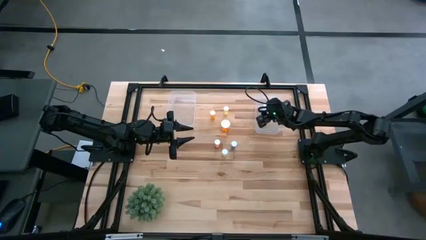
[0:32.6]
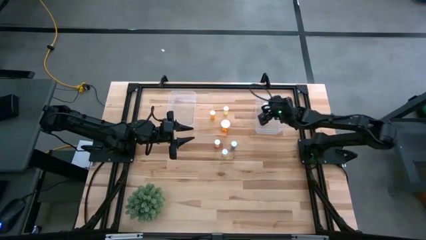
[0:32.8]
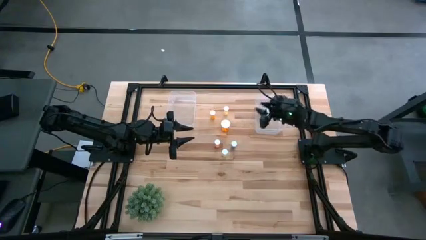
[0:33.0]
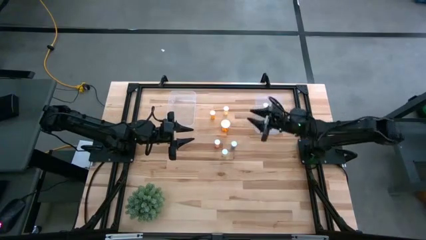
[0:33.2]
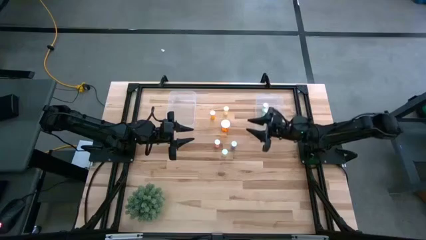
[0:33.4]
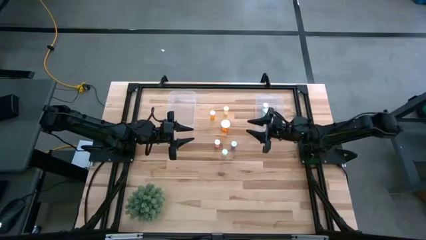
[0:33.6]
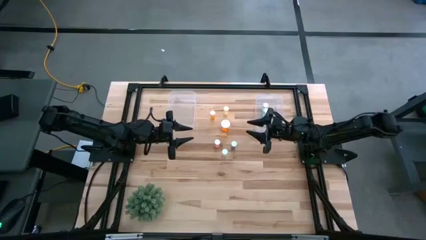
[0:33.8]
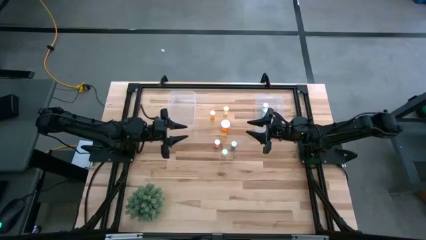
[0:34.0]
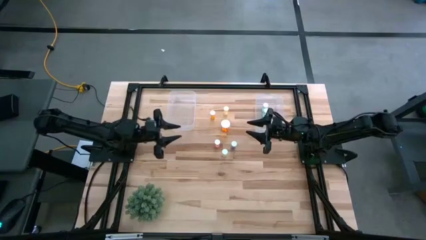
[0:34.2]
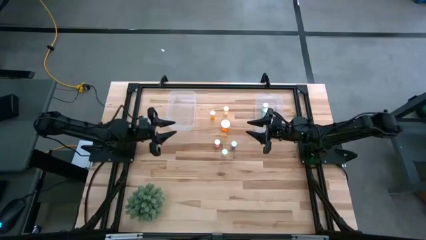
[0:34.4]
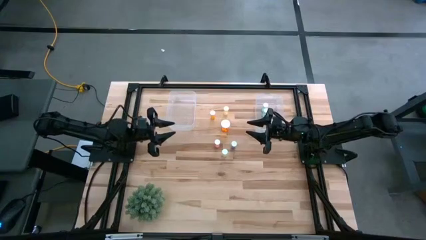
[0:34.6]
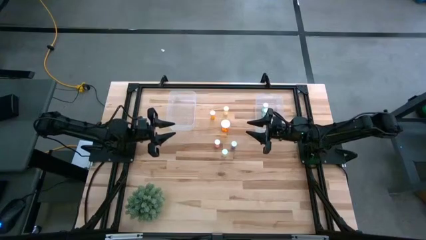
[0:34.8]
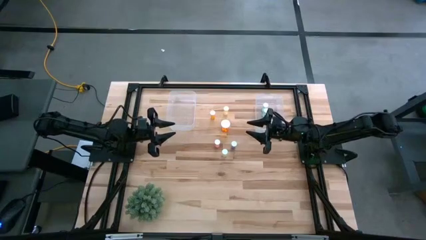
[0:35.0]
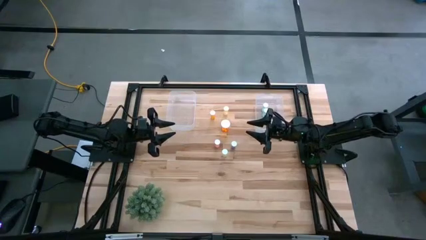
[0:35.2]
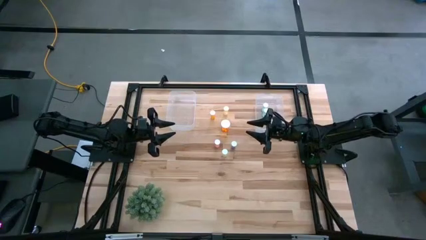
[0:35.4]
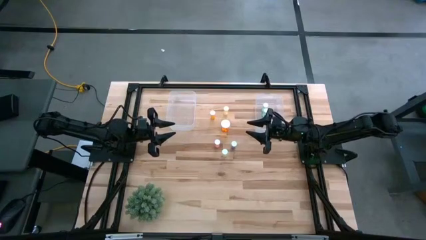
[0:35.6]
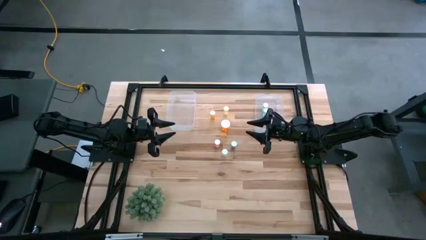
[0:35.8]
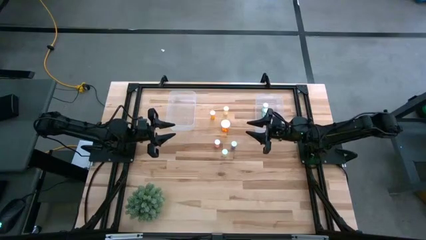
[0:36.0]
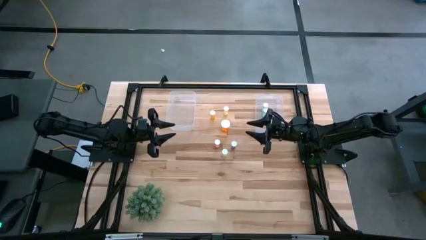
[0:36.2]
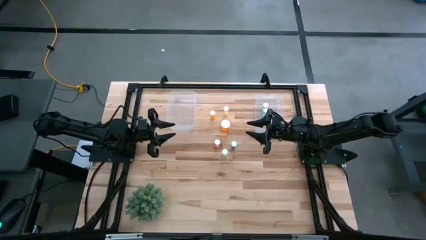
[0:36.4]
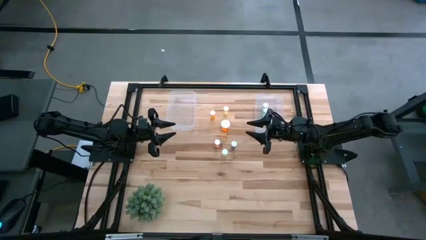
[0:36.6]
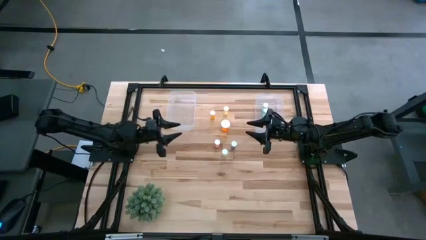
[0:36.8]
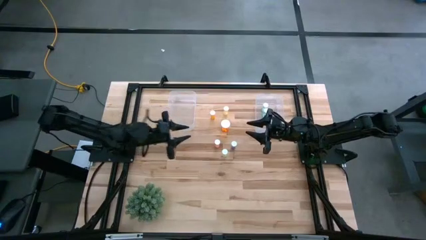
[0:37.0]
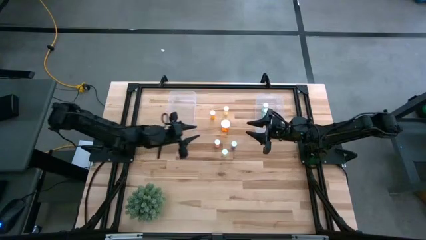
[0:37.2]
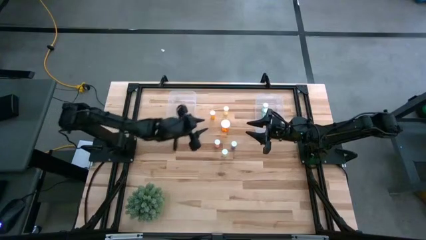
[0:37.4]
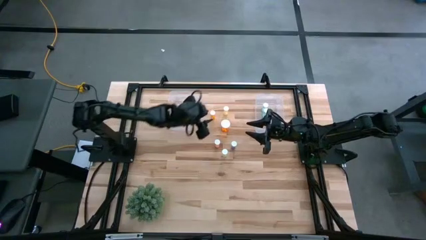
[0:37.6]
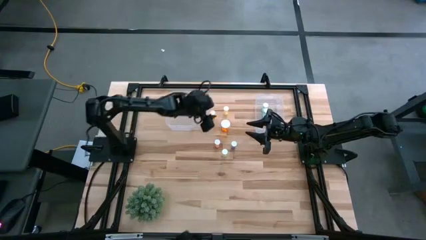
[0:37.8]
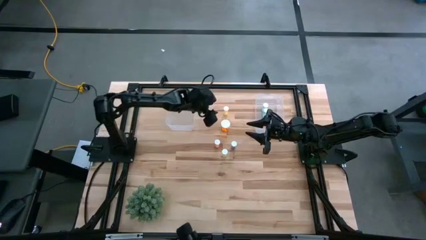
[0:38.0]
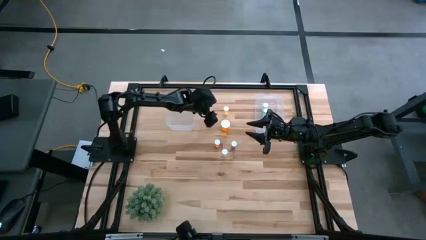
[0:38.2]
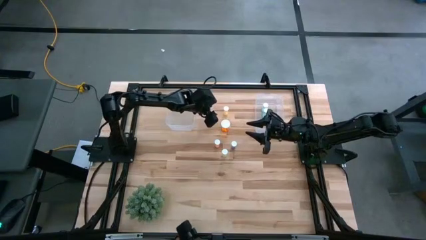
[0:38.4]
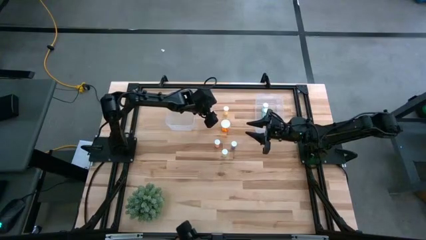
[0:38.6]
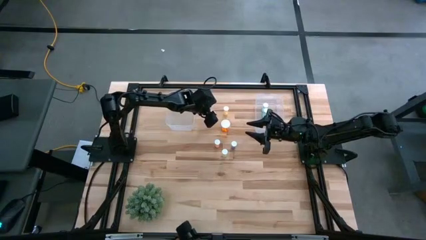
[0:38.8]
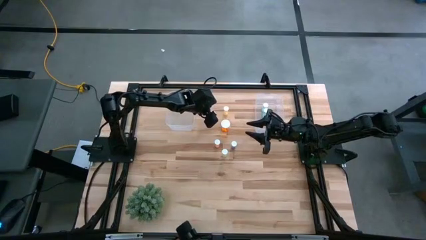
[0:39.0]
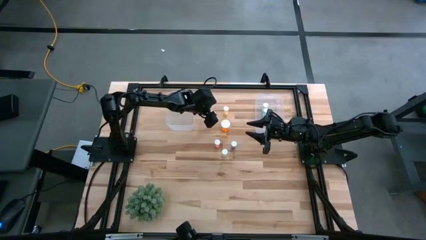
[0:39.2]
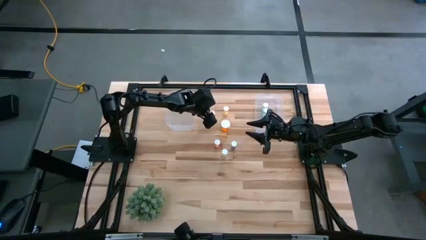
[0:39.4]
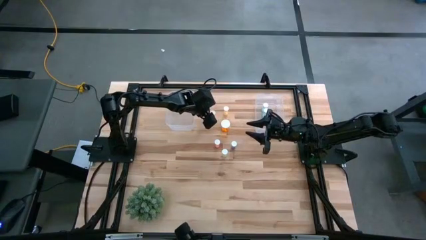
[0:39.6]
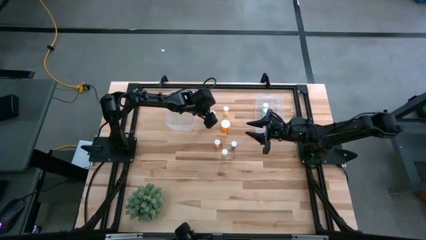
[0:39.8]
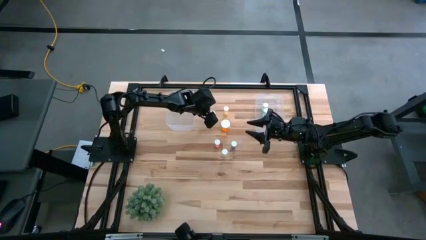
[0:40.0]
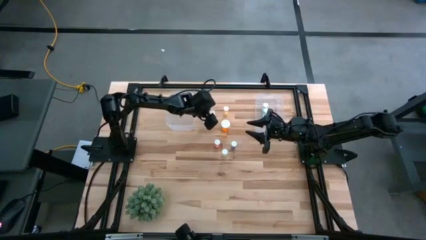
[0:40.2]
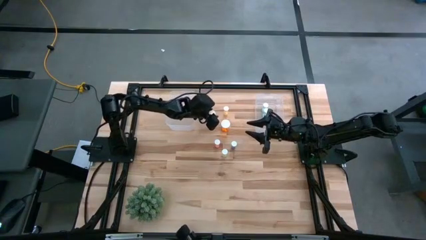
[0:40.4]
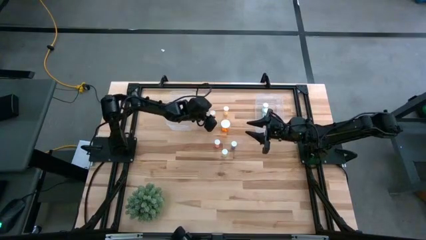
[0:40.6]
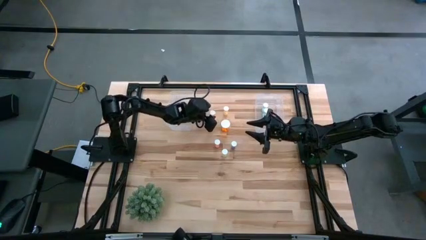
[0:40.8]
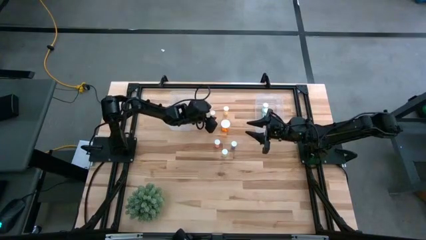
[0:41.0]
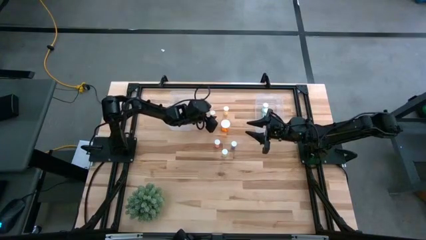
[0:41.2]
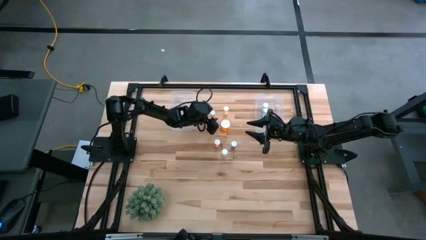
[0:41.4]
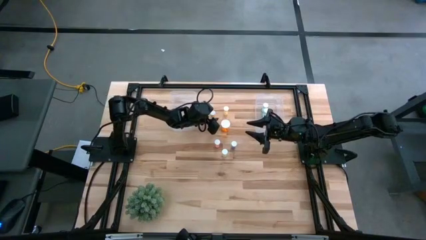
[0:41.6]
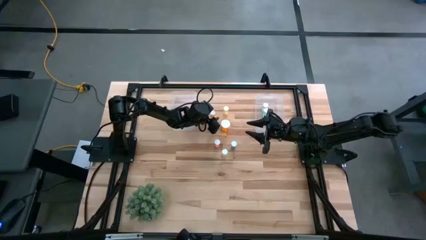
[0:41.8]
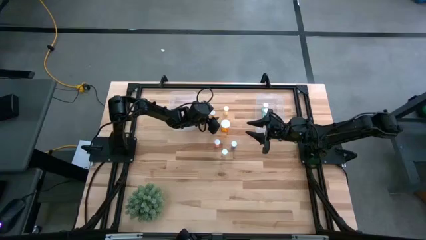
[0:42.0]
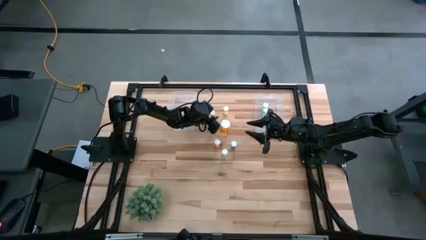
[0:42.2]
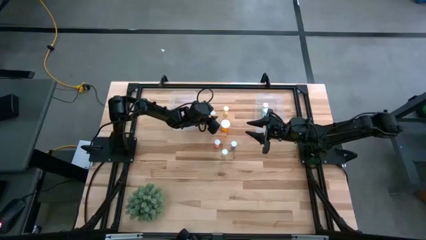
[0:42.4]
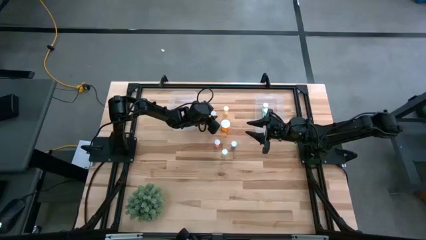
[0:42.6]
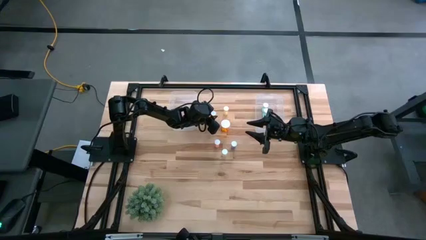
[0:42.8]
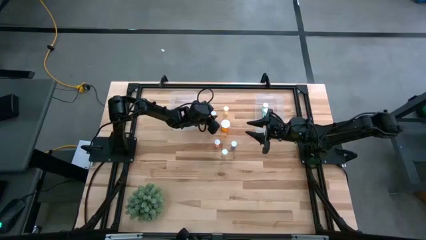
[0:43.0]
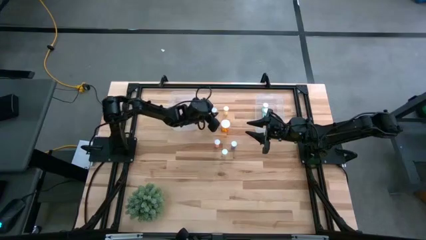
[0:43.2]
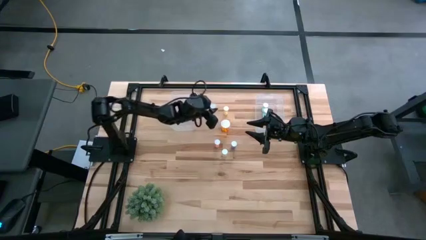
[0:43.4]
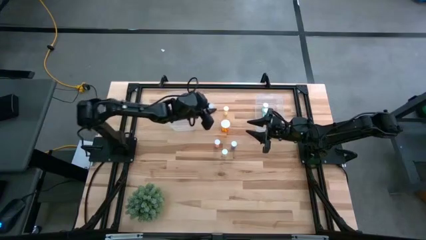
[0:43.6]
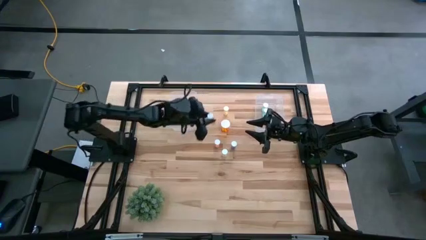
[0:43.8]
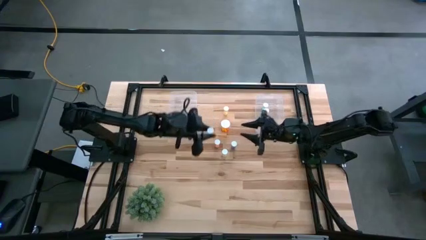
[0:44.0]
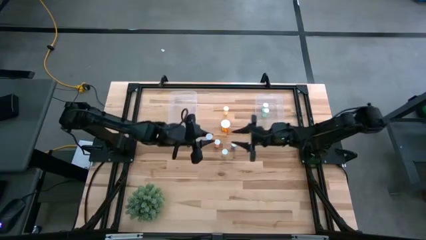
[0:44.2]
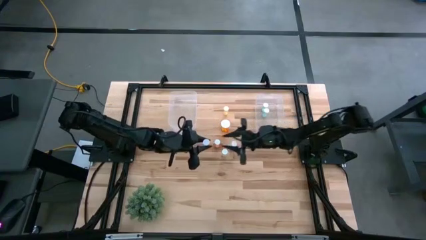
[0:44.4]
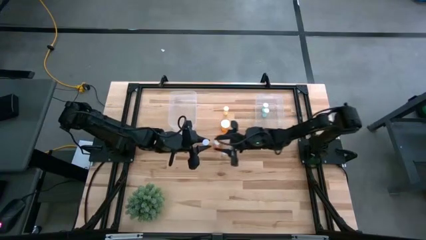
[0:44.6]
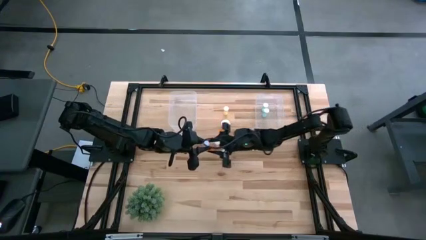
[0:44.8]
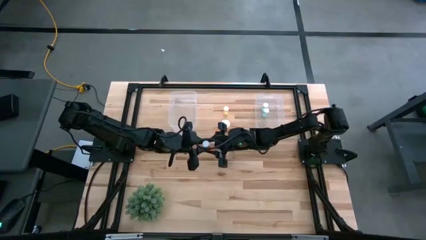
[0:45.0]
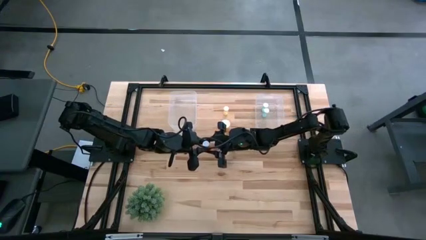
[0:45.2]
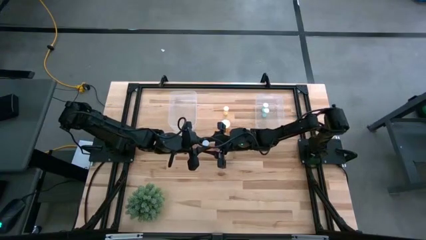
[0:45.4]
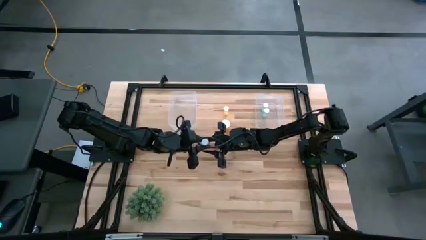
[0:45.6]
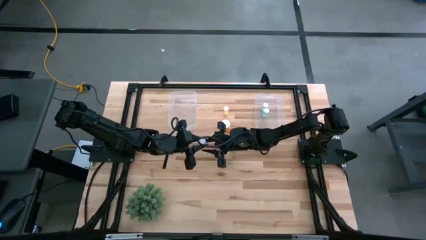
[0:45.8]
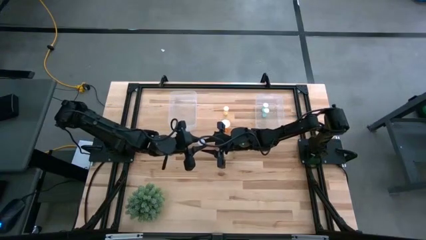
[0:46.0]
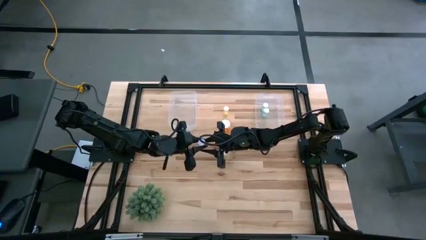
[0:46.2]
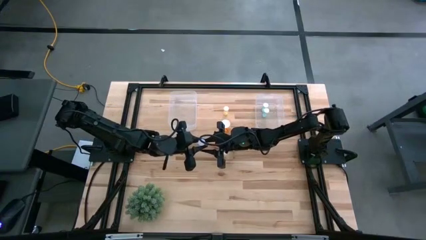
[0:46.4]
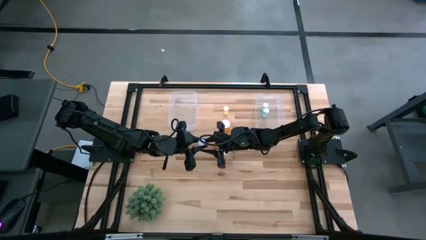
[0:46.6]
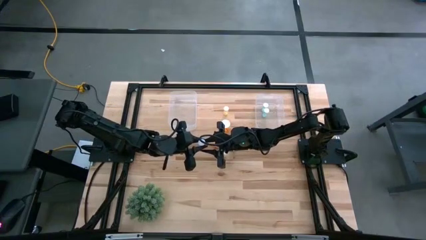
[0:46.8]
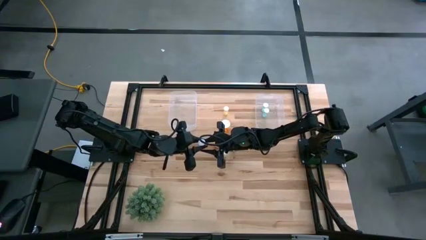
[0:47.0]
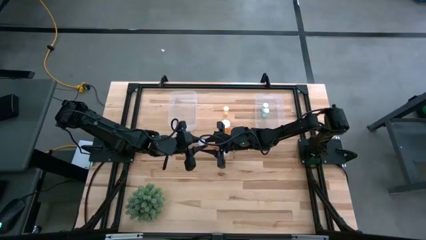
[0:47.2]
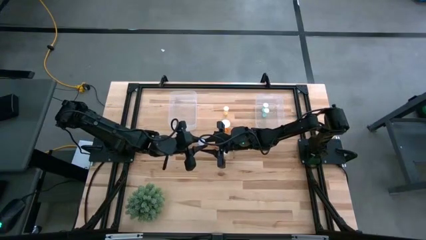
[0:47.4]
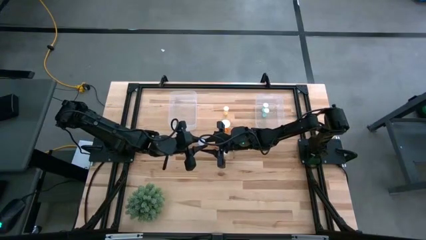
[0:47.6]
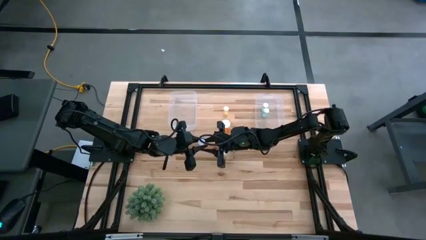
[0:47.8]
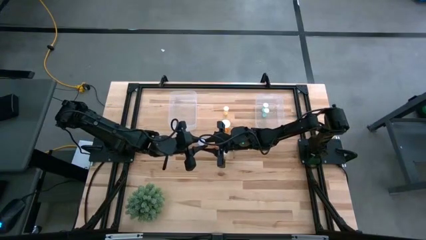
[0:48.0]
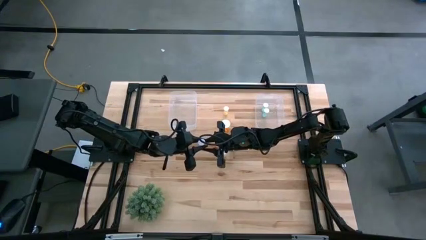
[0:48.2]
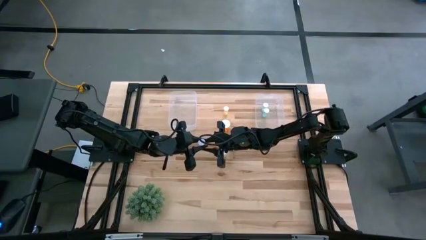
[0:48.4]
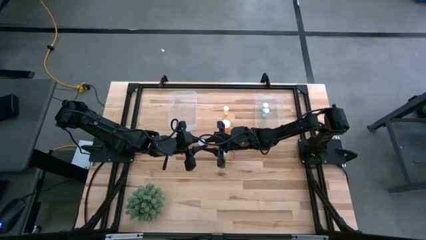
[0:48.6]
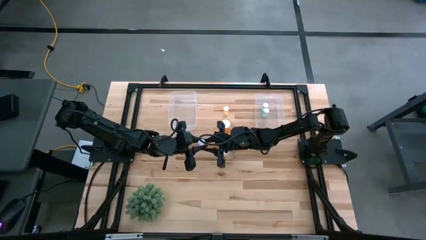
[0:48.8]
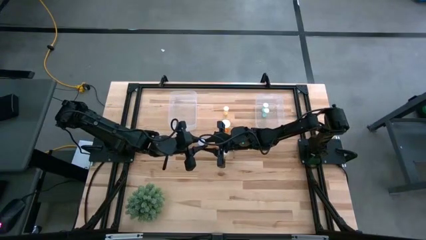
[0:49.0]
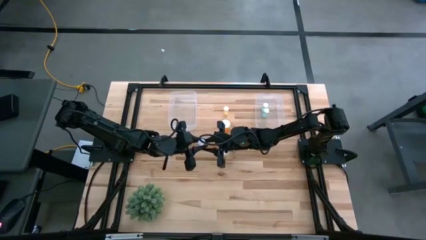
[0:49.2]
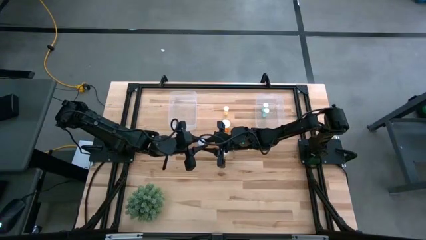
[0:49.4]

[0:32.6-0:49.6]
Task: Pick and place medicine bottles into bin by pill shape (circle, oval)
Put the small orange tablet bottle into the right transparent bin
